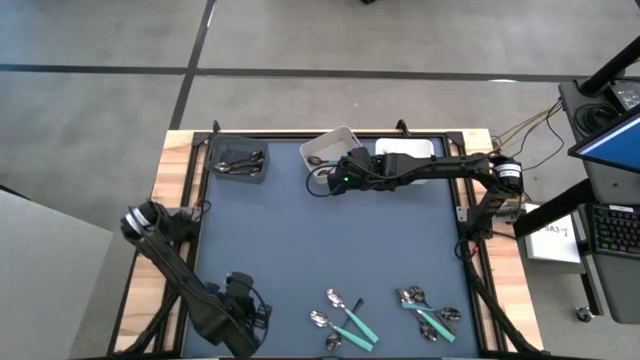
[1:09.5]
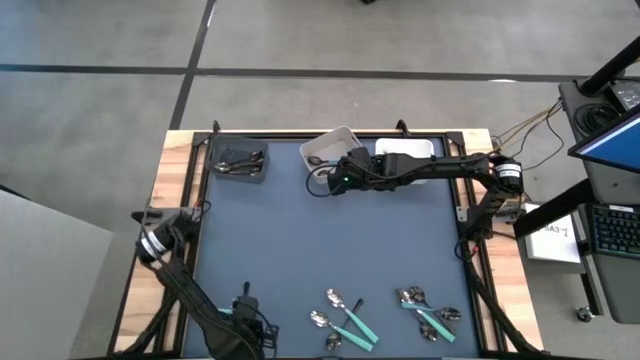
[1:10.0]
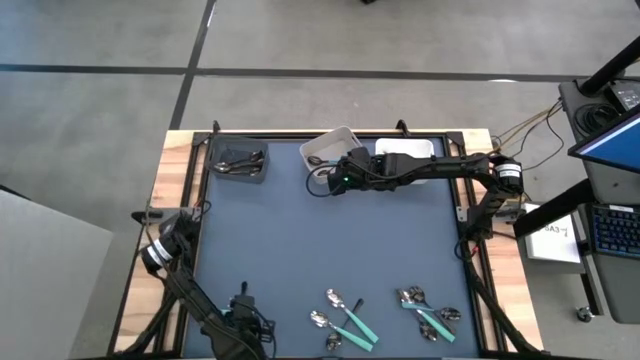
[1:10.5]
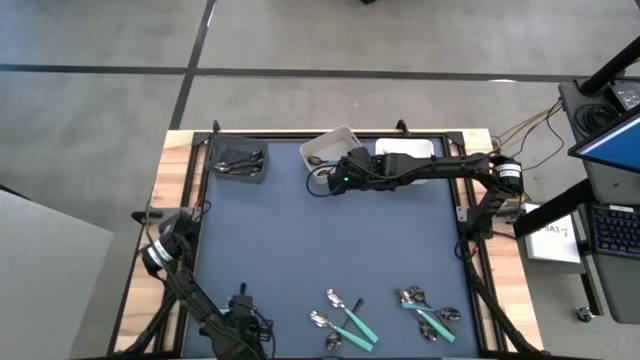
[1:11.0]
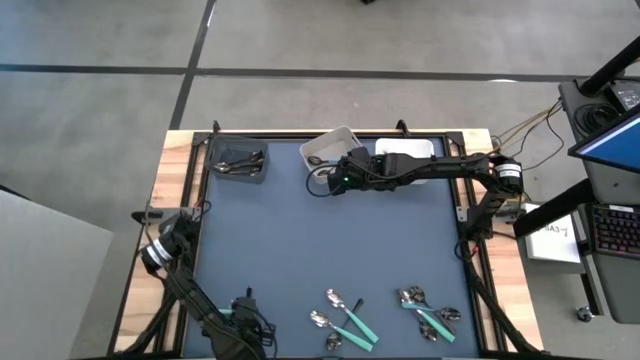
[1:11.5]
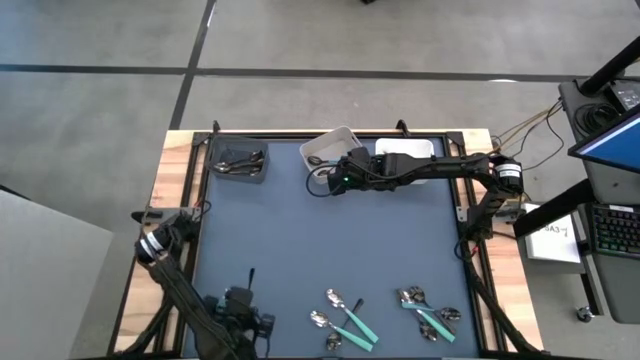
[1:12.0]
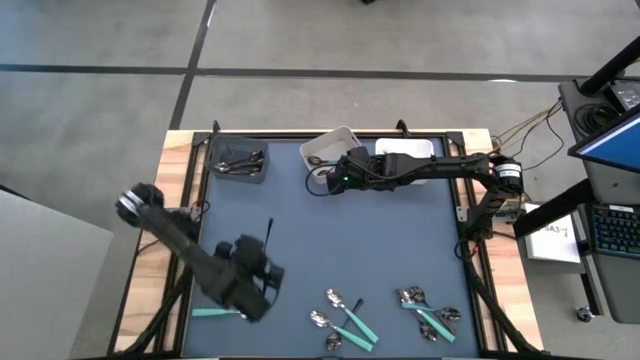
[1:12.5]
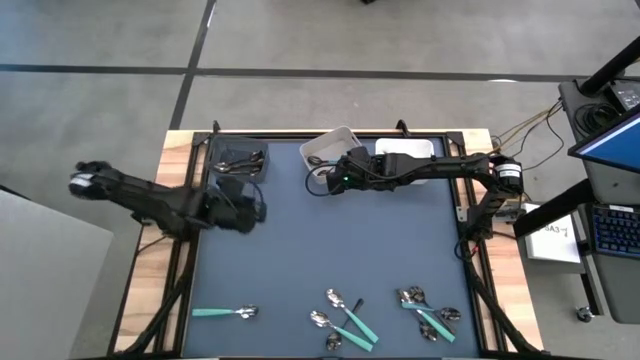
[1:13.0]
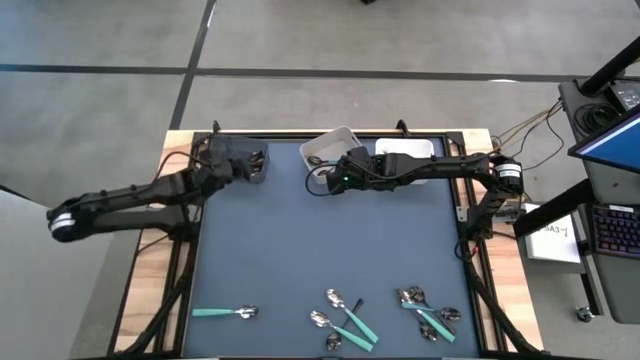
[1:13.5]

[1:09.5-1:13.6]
Task: Sort silverware by color (type)
Put the black spoon into the black bin

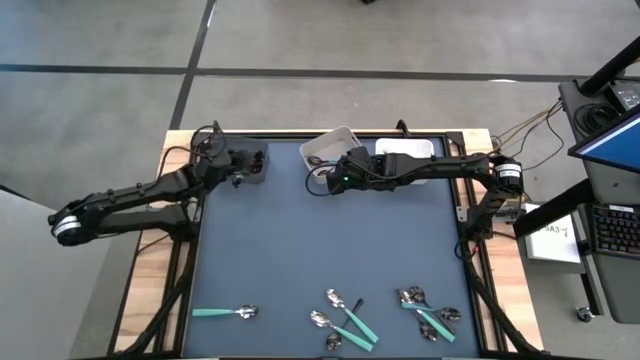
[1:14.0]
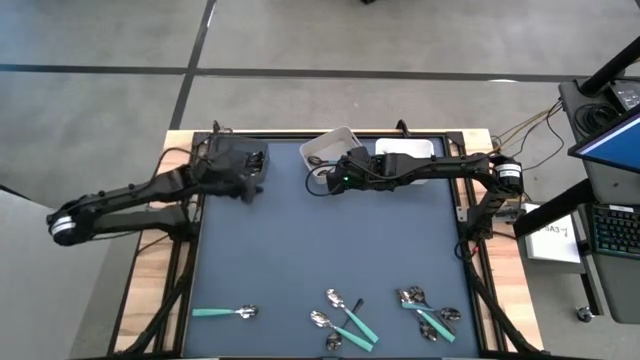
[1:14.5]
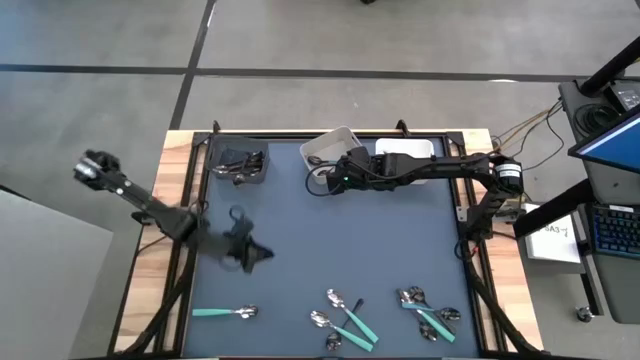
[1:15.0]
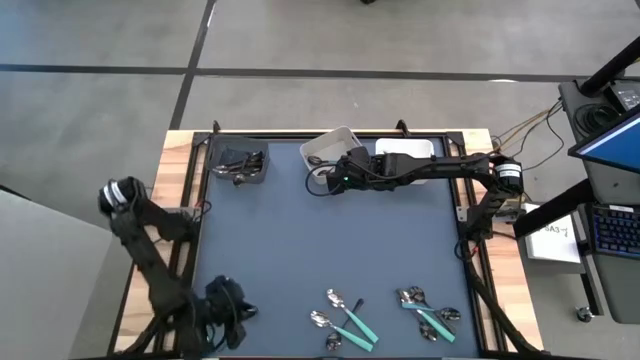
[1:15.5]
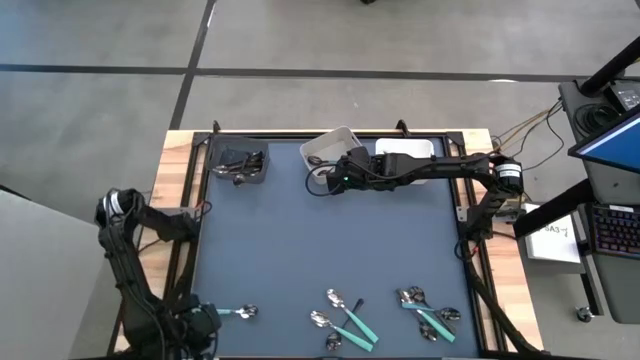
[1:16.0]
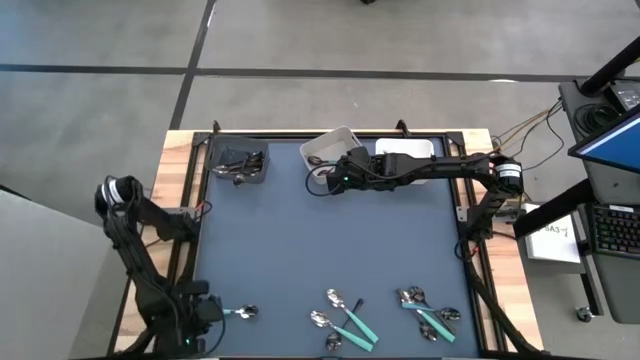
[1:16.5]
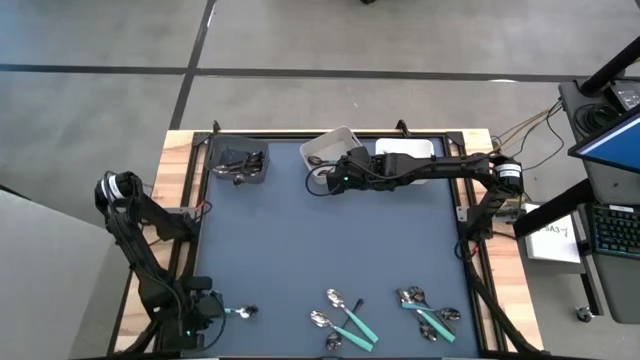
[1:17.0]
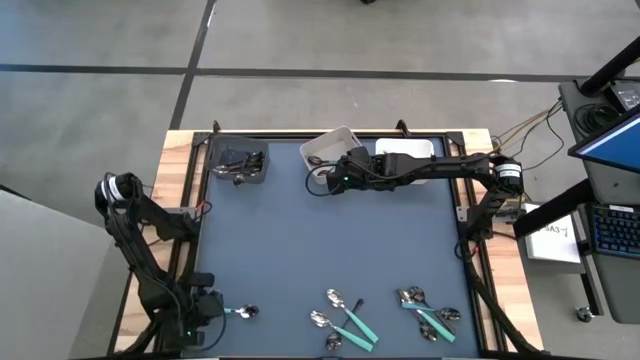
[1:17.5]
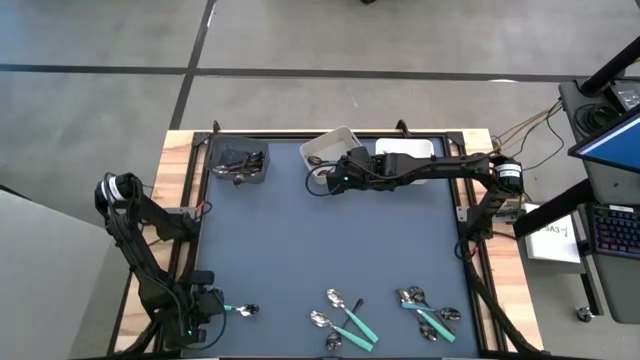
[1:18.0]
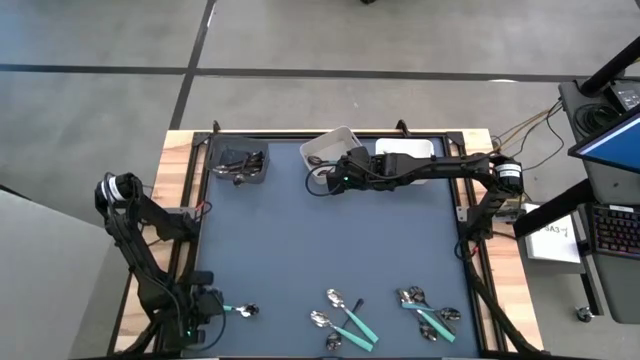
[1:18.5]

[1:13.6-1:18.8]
Put the light blue spoon into the white bin

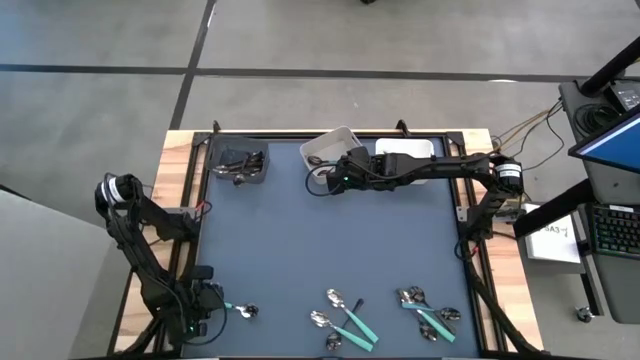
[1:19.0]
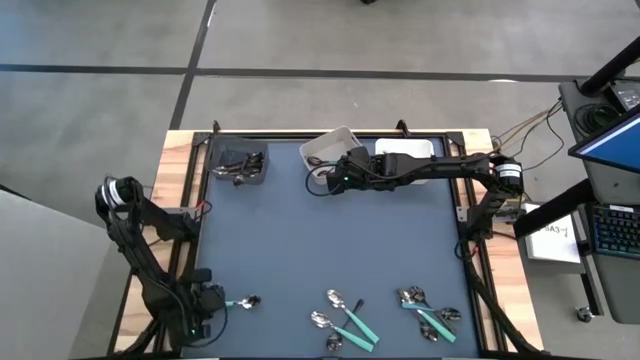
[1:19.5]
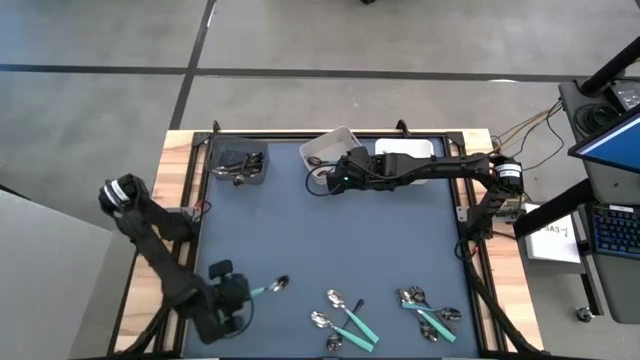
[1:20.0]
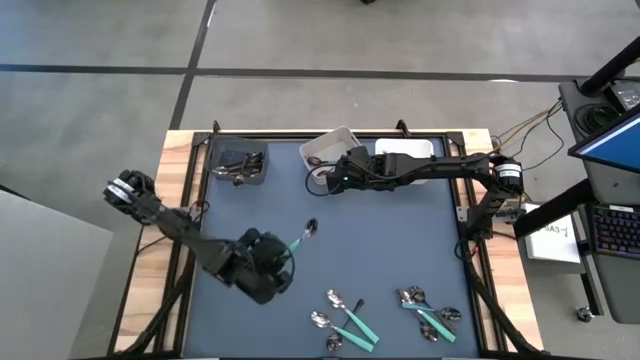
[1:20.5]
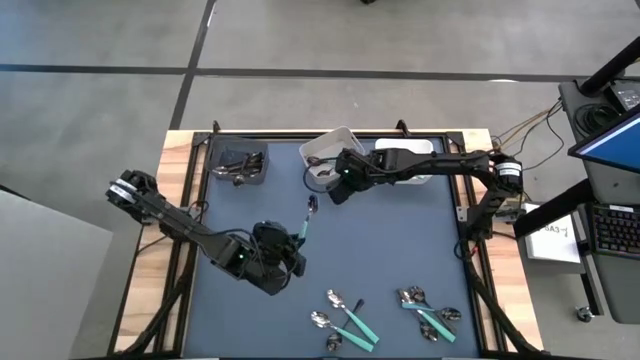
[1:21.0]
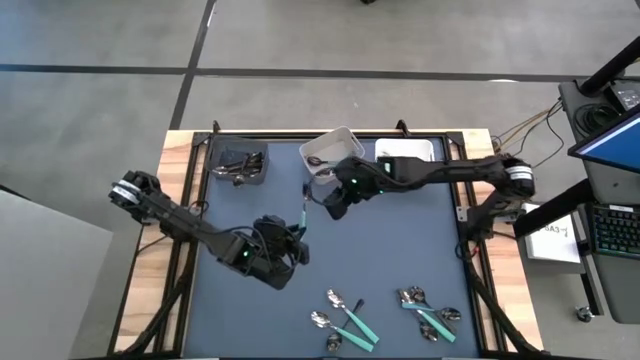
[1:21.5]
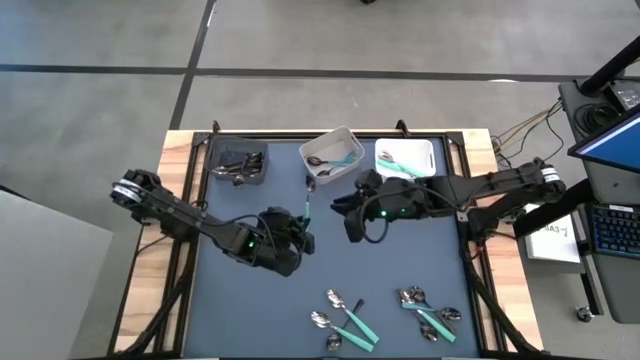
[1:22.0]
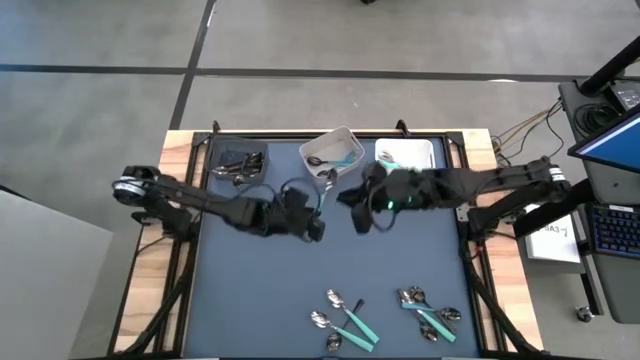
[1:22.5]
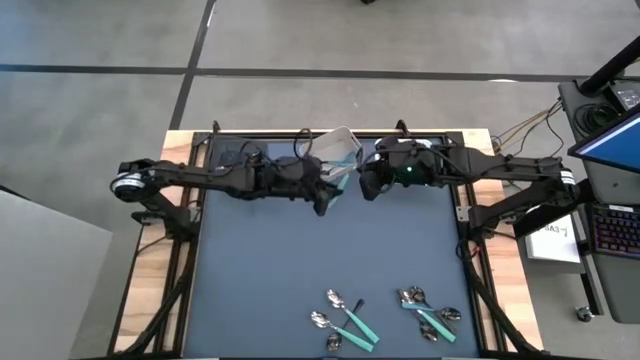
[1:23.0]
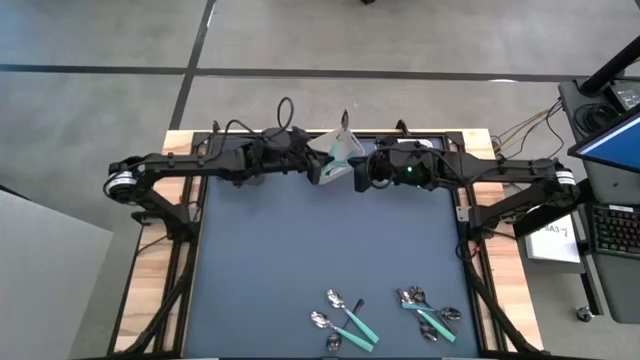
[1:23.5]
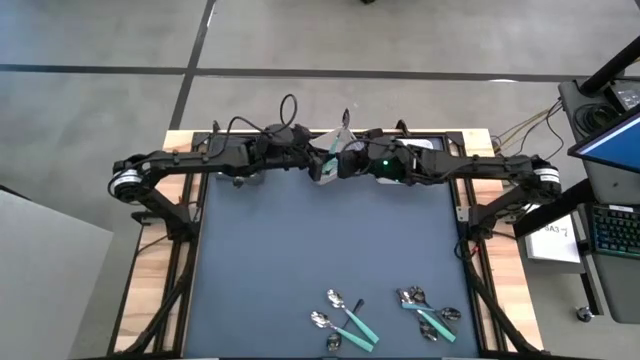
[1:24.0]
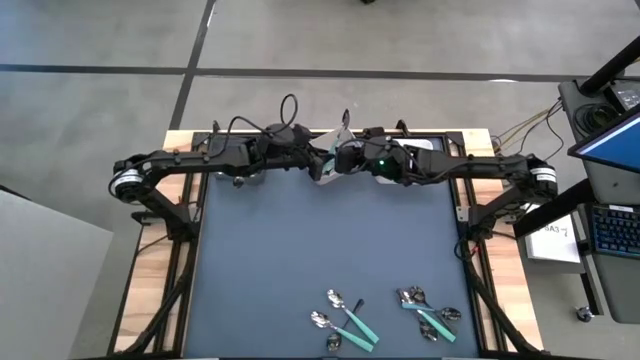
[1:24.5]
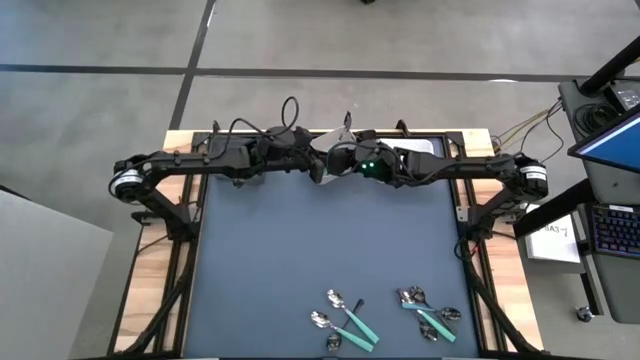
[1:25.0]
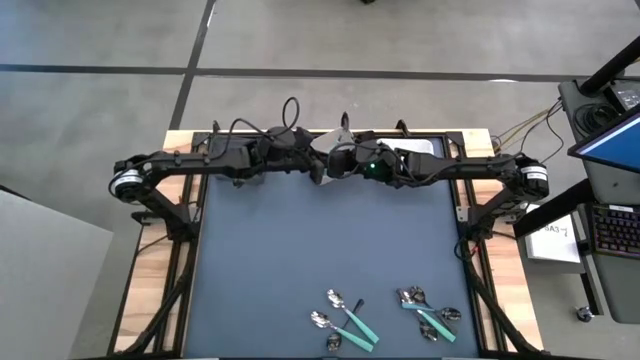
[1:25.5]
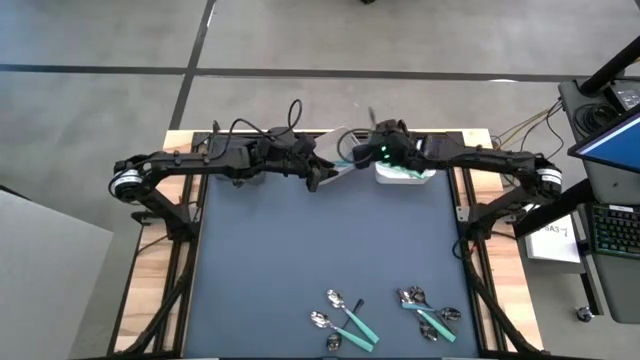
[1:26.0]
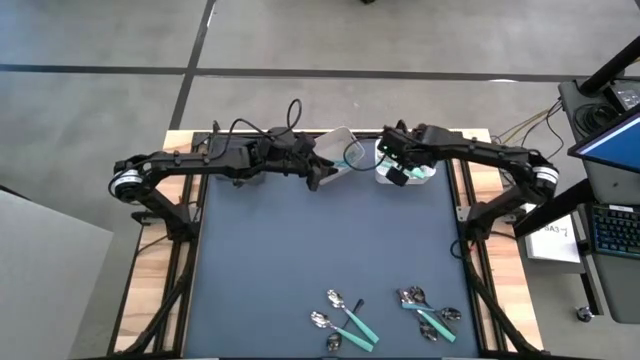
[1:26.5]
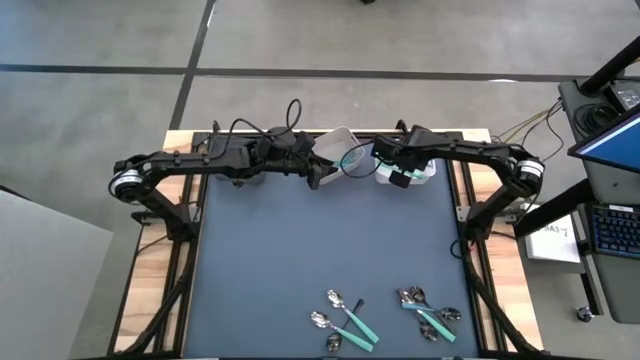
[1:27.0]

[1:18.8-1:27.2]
Put the light blue spoon into the white bin

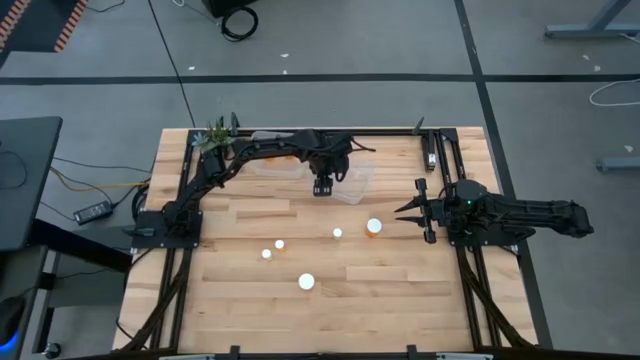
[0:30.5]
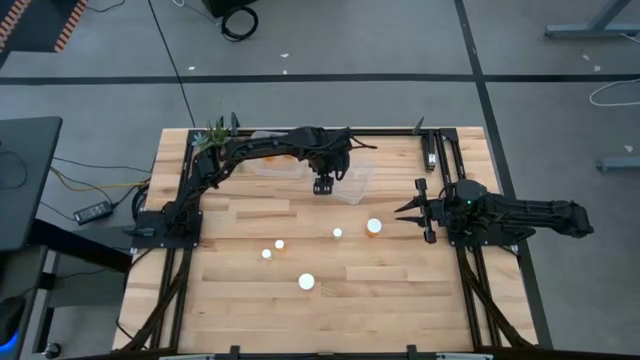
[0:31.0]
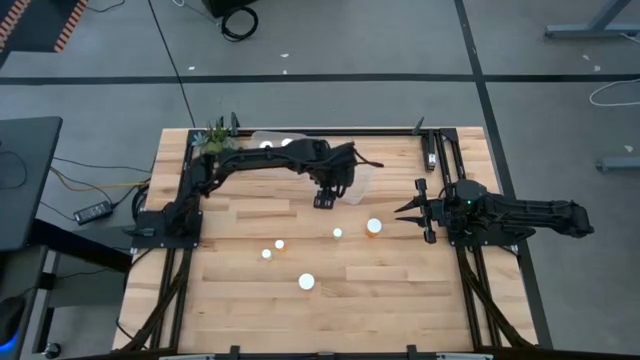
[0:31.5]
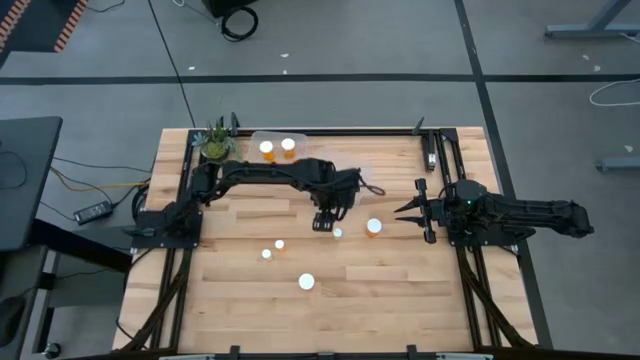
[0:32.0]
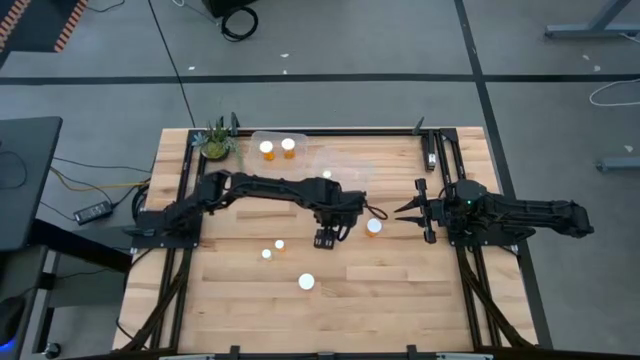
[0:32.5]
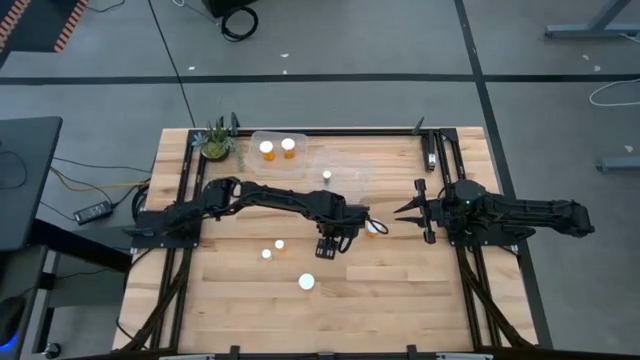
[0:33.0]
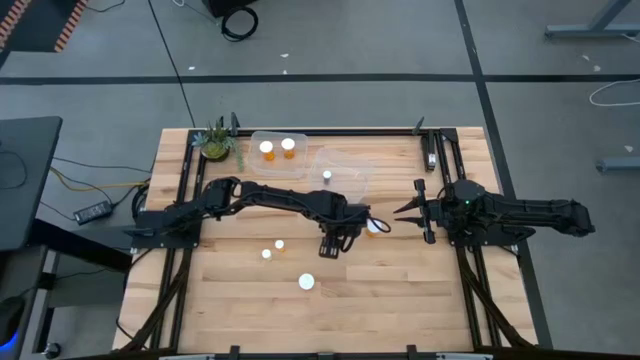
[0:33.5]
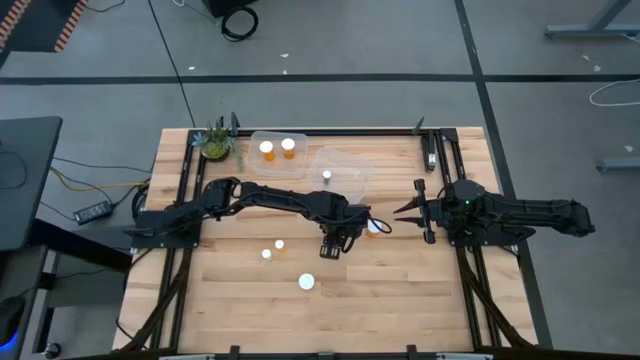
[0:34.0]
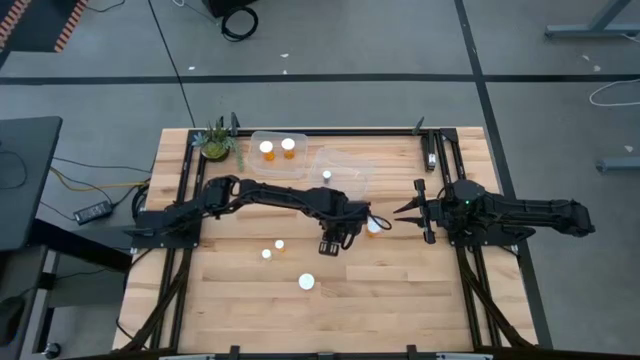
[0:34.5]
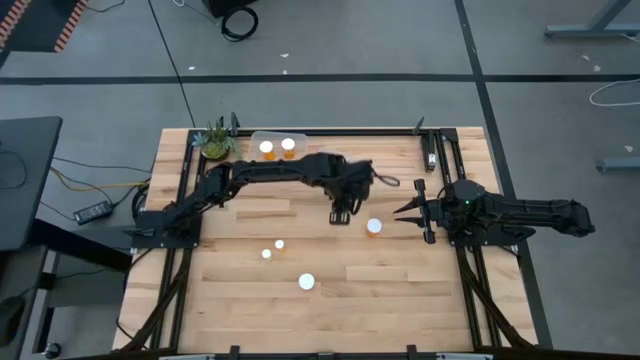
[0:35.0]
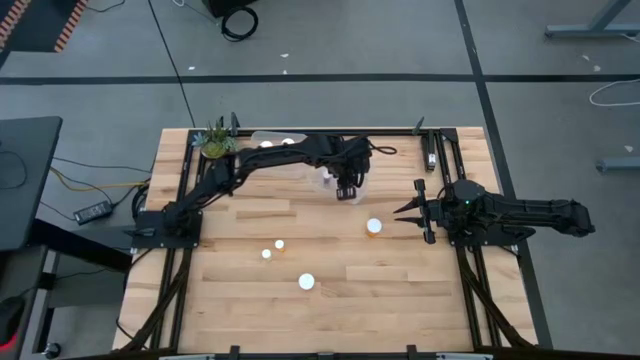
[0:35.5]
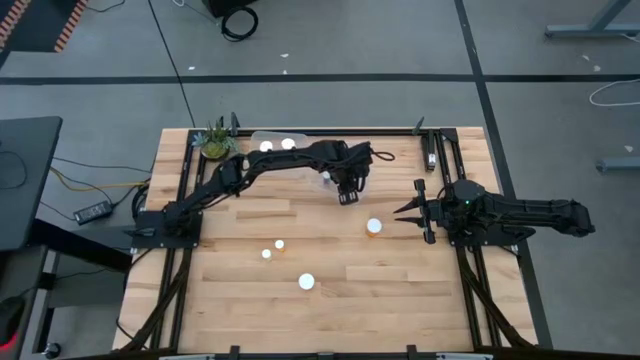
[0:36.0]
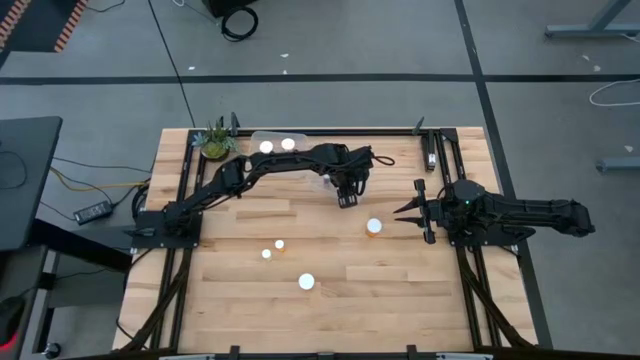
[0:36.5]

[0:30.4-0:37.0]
Task: Pick and place medicine bottles into bin by pill shape (circle, oval)
Put the right yellow pill bottle into the right transparent bin
